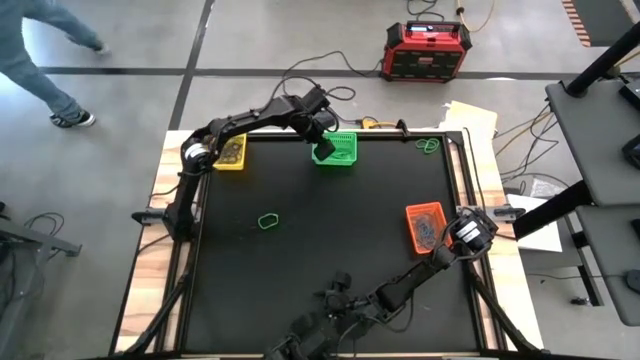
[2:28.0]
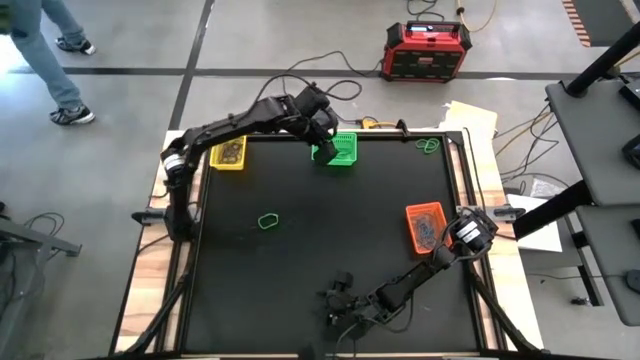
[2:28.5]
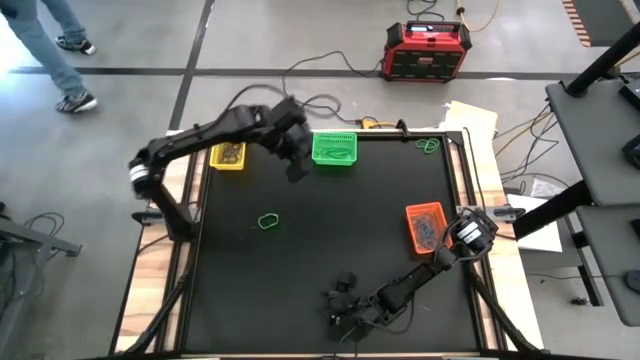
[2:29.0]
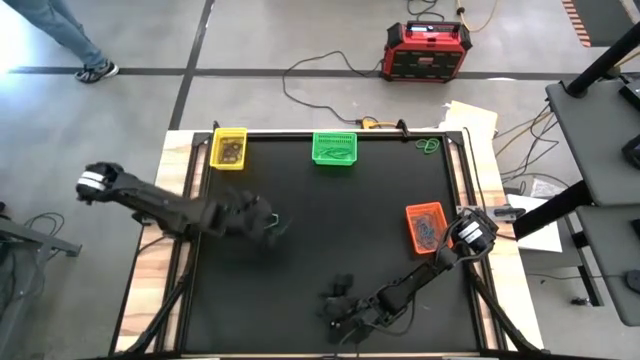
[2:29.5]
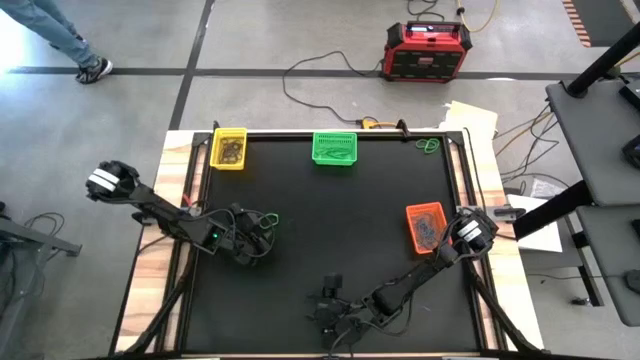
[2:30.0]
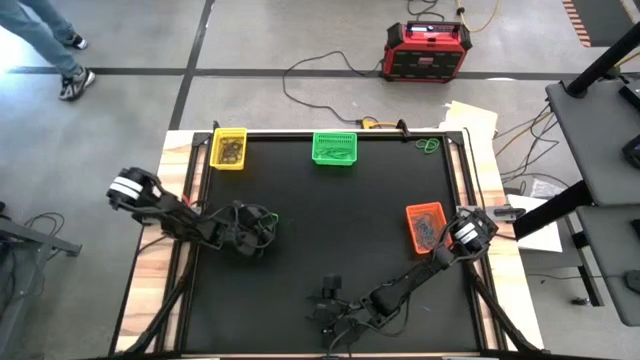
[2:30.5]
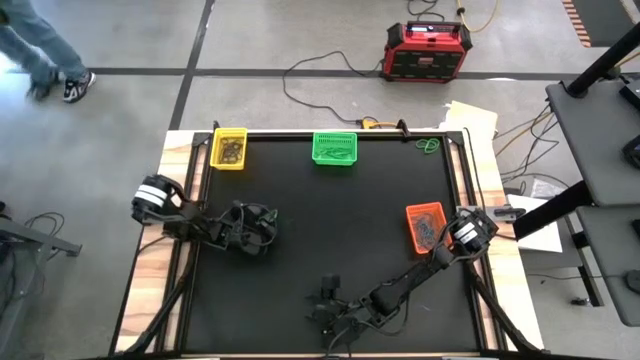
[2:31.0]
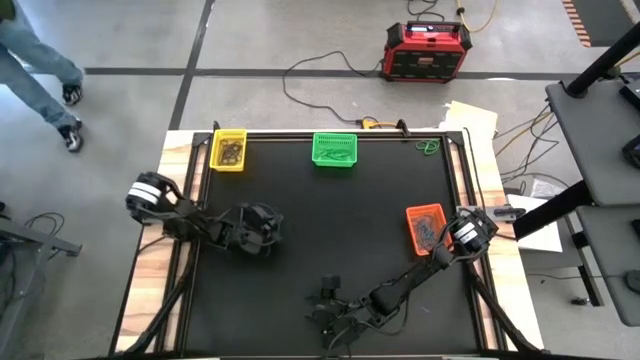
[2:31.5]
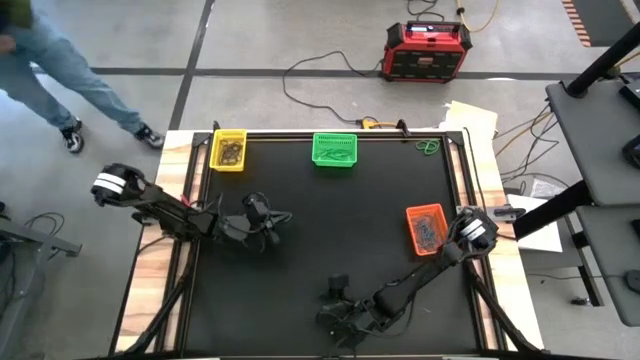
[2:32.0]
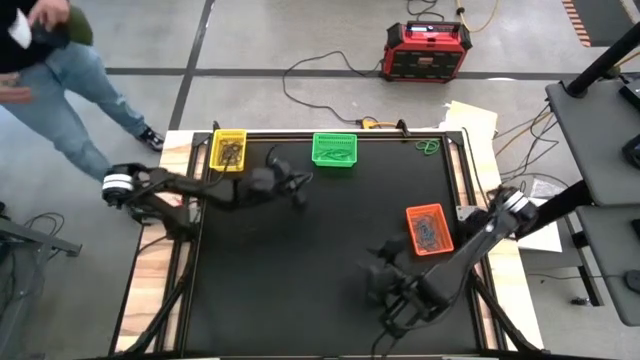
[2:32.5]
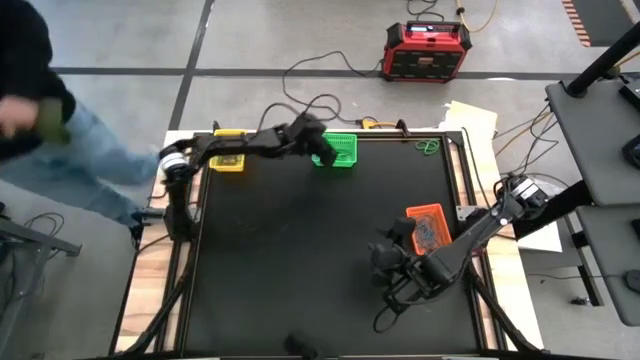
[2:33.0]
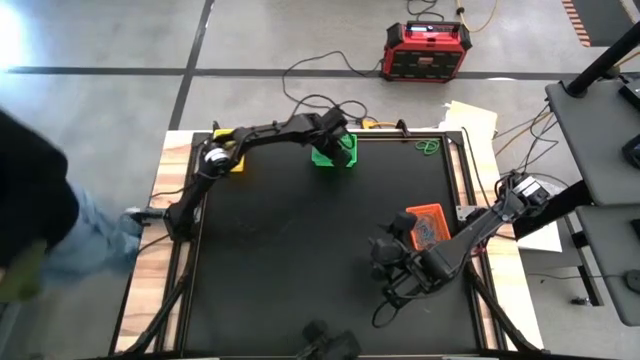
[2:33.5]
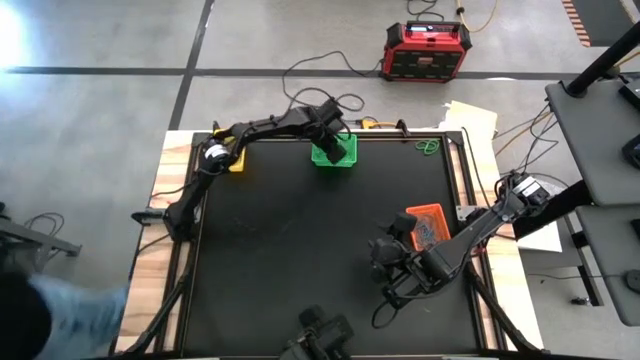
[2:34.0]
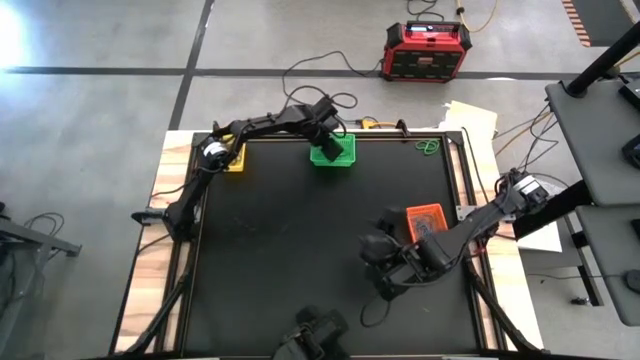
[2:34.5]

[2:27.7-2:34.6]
Task: Sort rubber bands into baskets
Put the green rubber band into the green bin

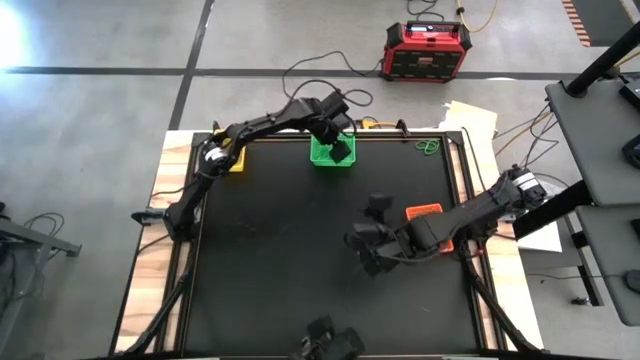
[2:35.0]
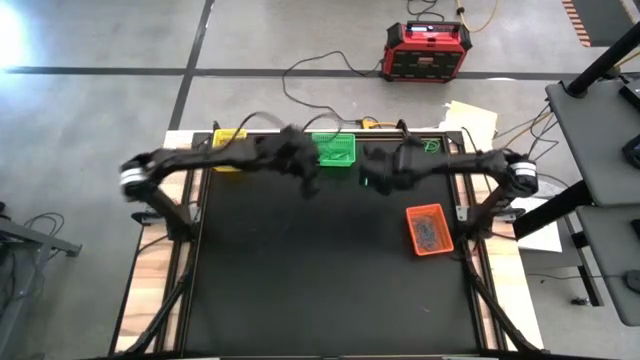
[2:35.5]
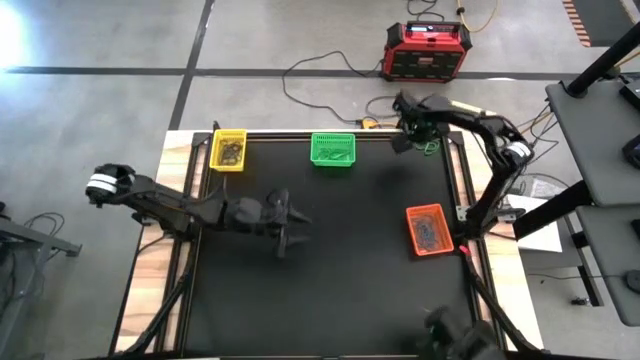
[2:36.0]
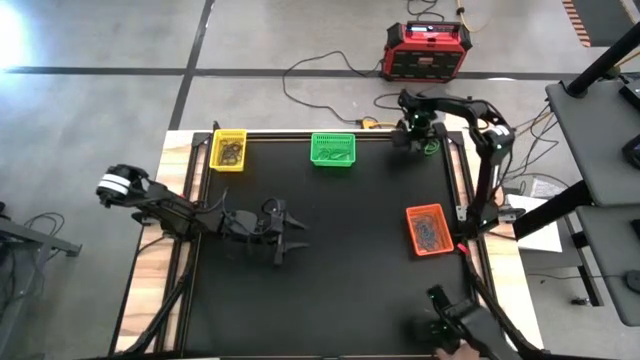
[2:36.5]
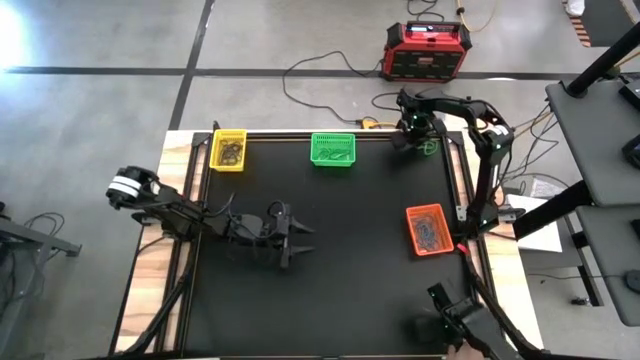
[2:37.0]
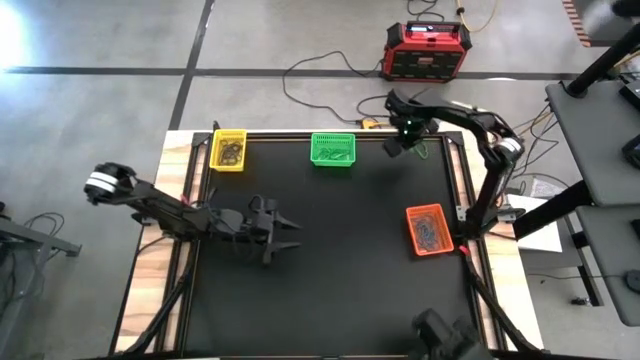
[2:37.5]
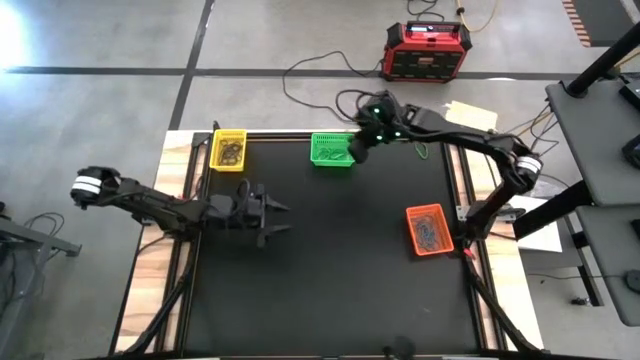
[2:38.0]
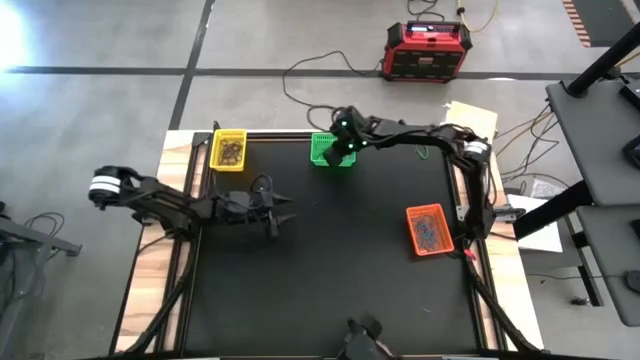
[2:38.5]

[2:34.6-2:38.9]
Put the green rubber band into the green bin

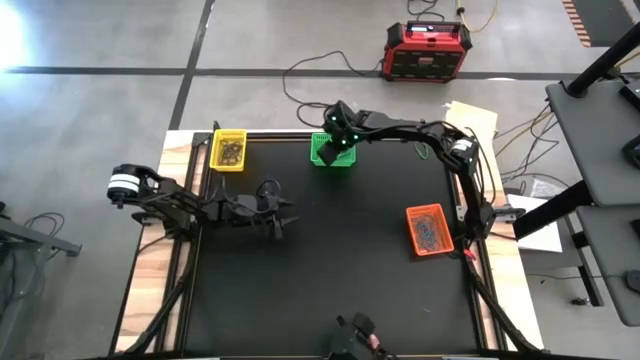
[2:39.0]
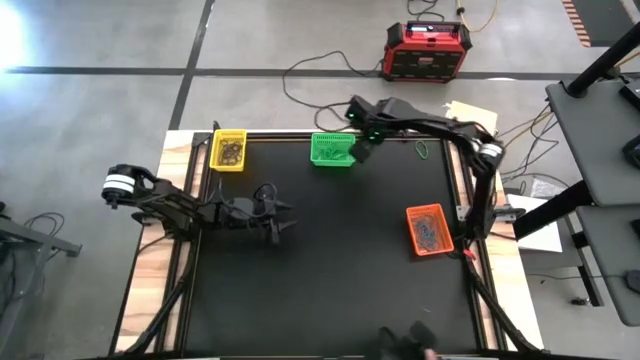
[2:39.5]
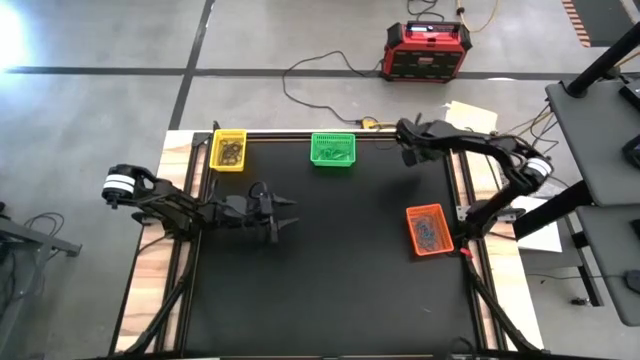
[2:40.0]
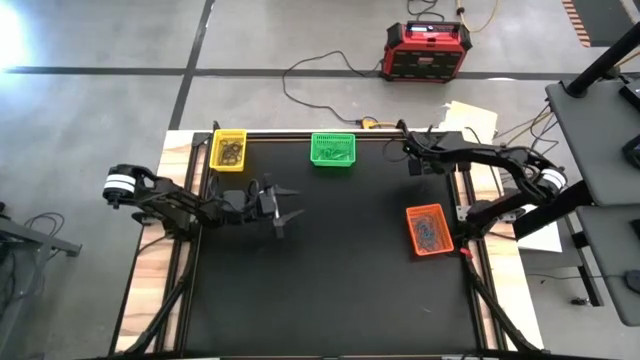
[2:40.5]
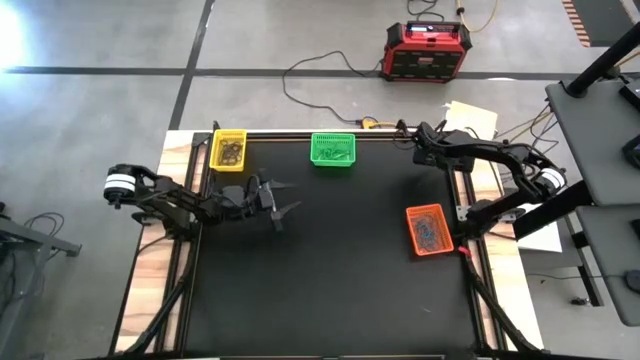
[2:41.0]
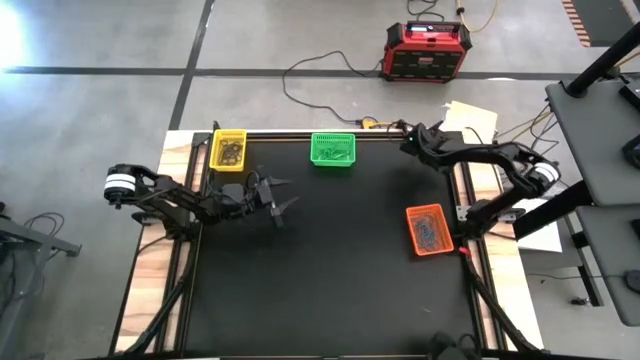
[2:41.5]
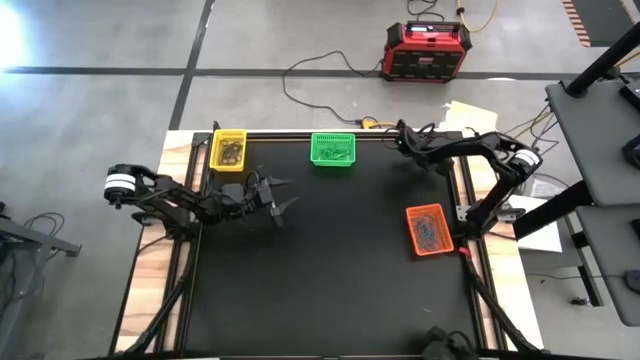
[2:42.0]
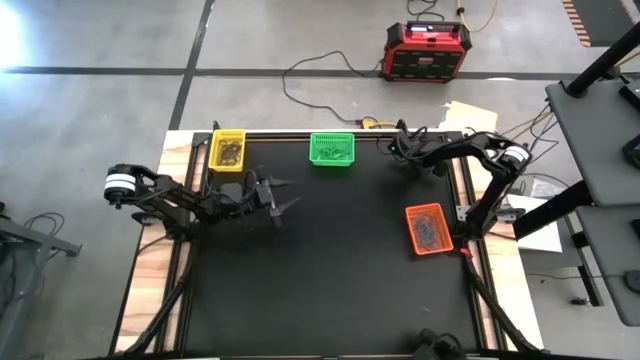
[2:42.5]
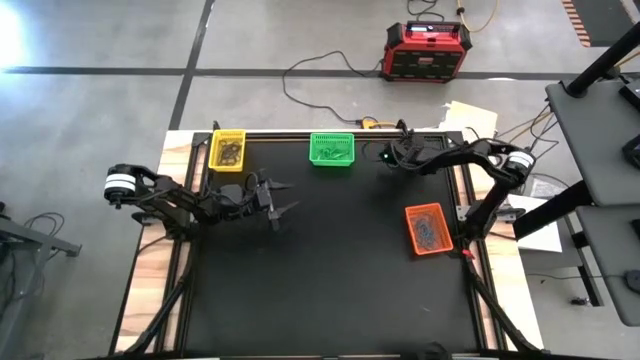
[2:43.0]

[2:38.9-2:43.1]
Put the green rubber band into the green bin

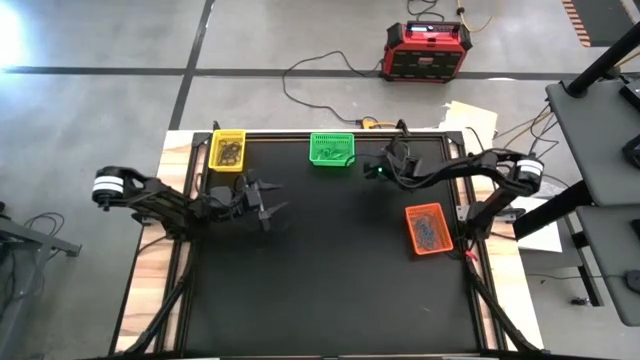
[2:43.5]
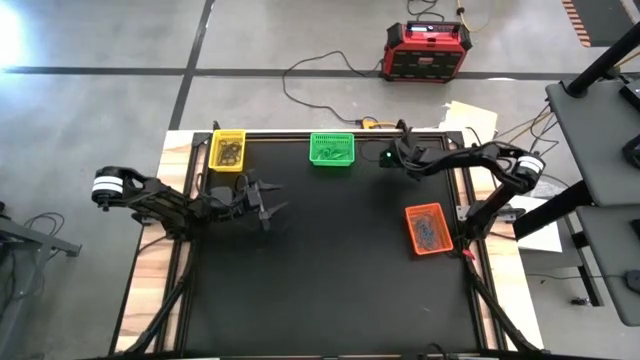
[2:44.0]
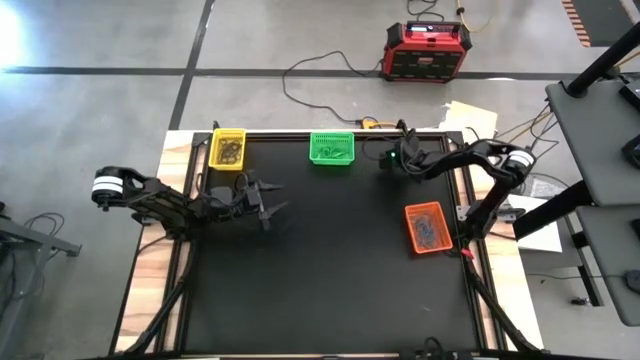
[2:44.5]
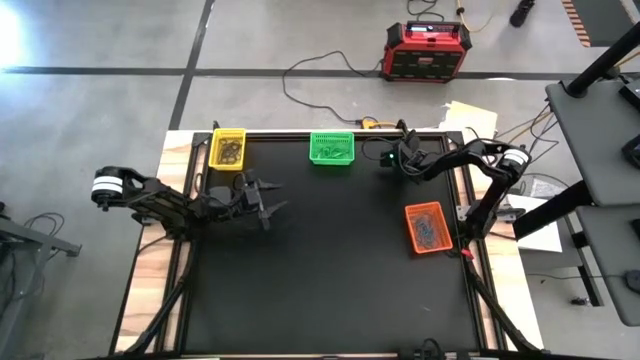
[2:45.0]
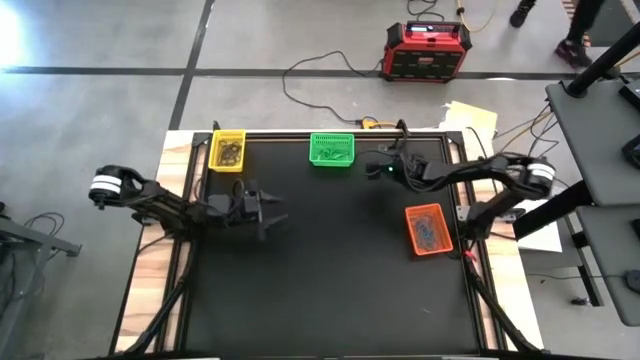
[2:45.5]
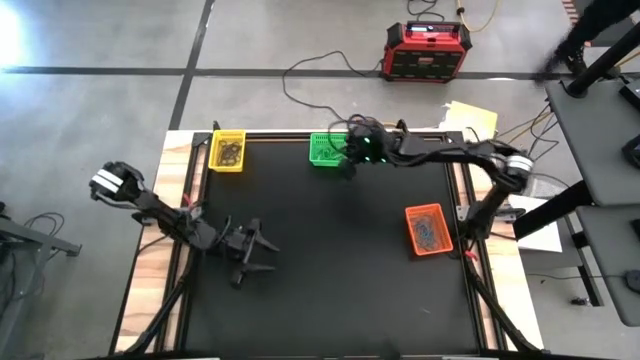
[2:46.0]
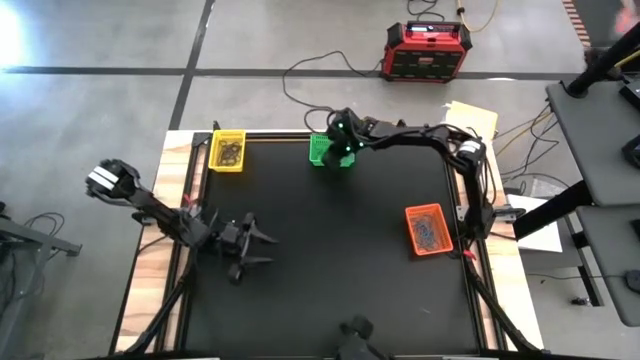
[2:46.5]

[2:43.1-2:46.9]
Put the green rubber band into the green bin

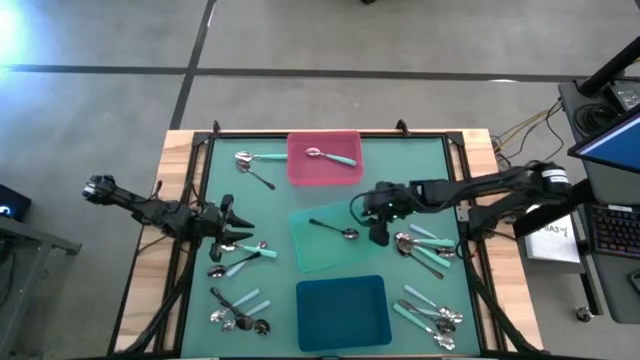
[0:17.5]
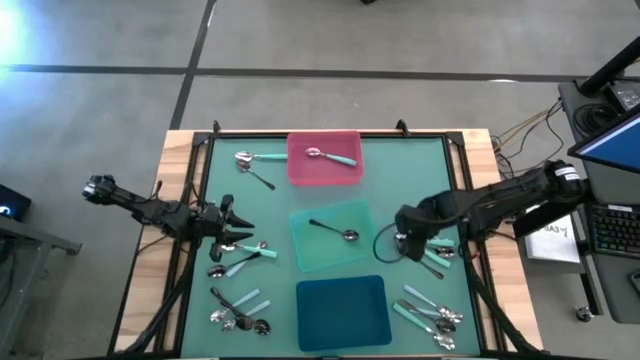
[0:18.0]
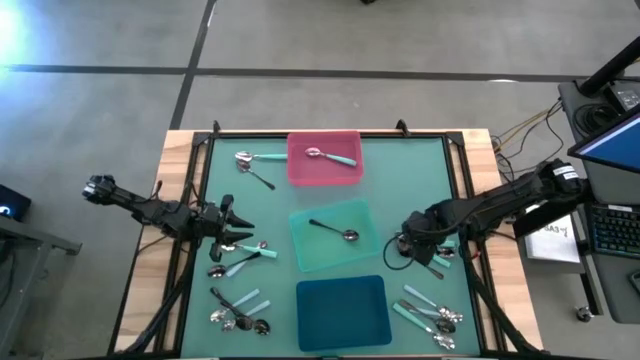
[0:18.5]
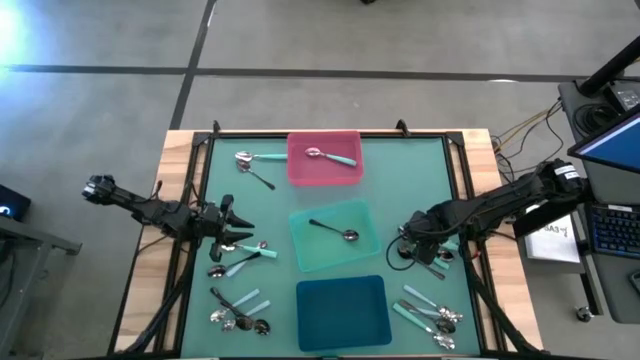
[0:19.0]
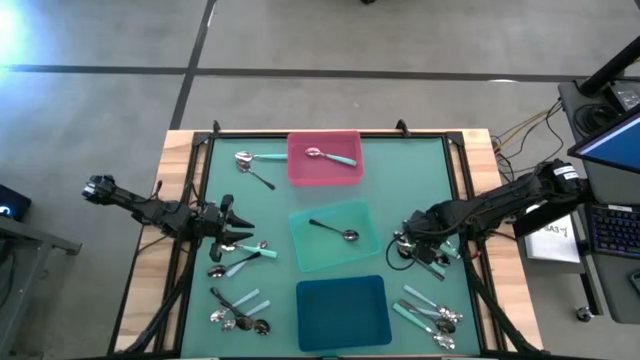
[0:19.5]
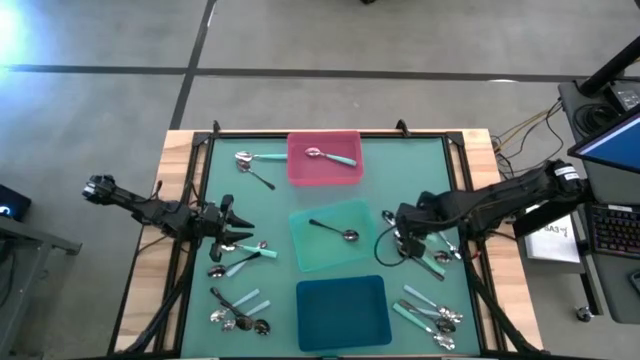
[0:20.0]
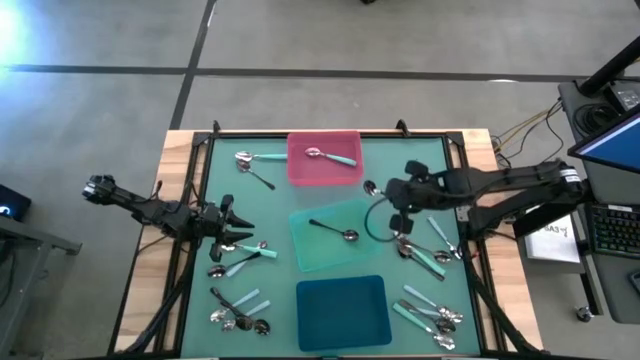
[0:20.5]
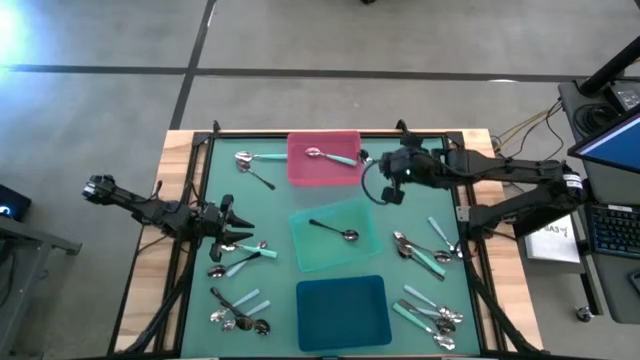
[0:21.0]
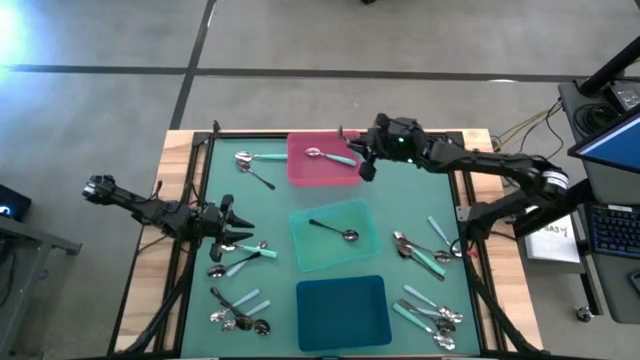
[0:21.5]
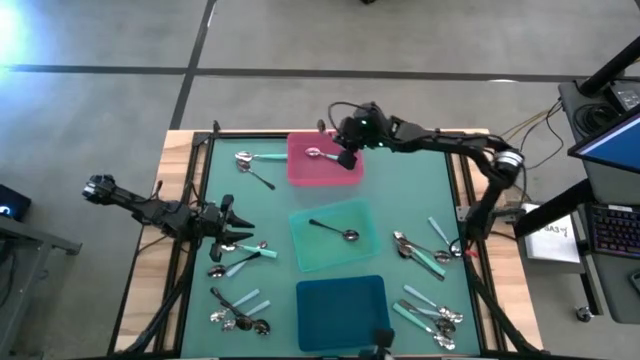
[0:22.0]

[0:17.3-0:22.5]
Task: Sort silverware by color (type)
Put the green spoon into the pink bin
